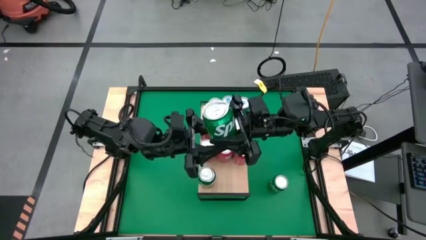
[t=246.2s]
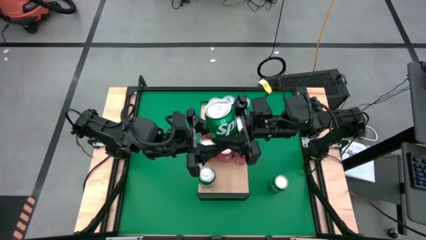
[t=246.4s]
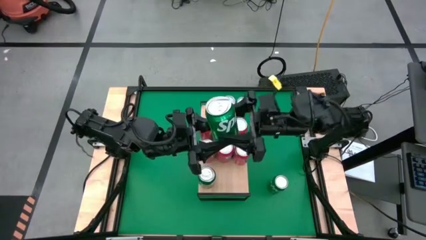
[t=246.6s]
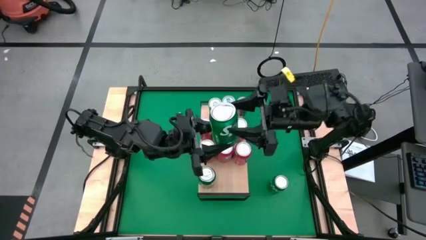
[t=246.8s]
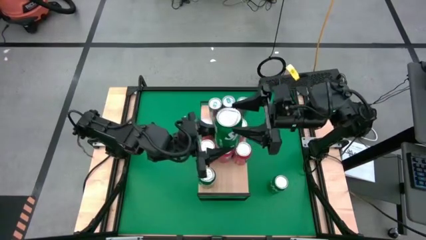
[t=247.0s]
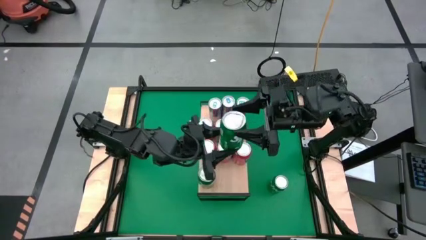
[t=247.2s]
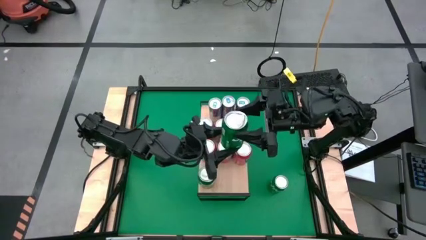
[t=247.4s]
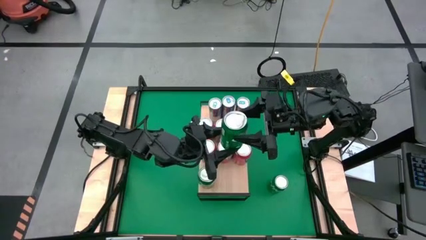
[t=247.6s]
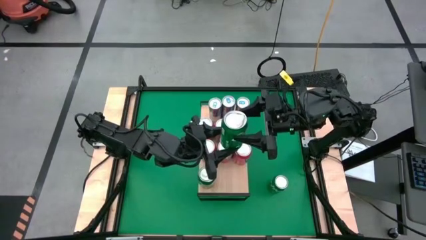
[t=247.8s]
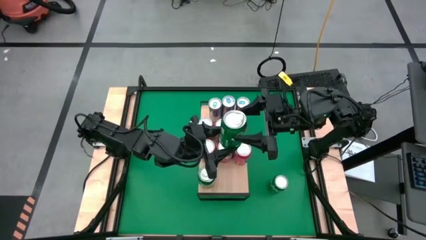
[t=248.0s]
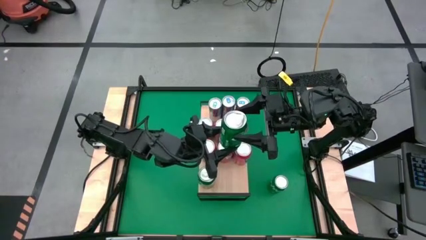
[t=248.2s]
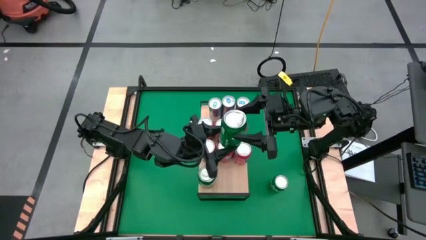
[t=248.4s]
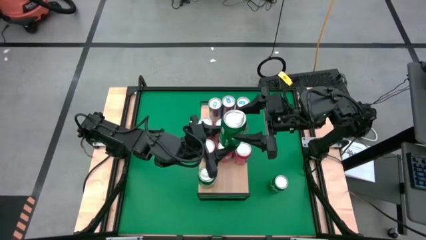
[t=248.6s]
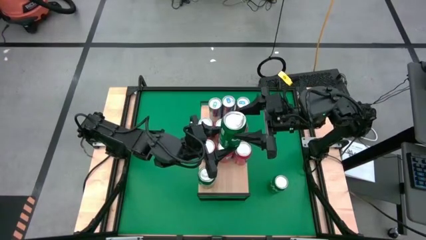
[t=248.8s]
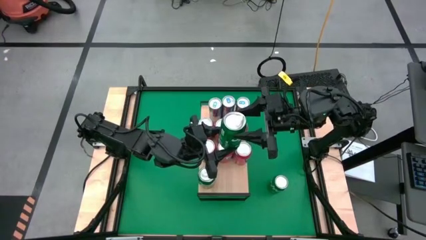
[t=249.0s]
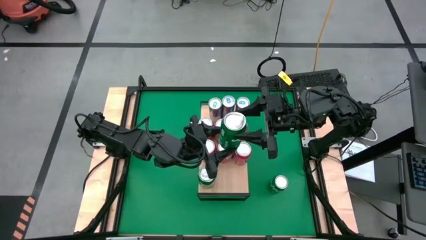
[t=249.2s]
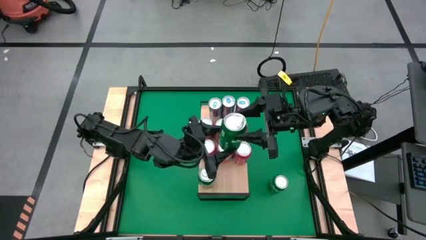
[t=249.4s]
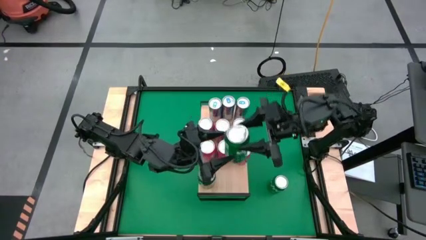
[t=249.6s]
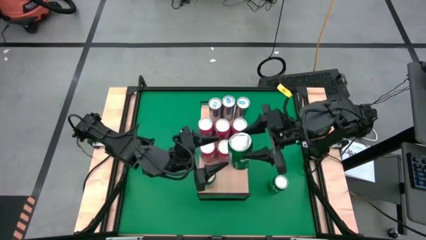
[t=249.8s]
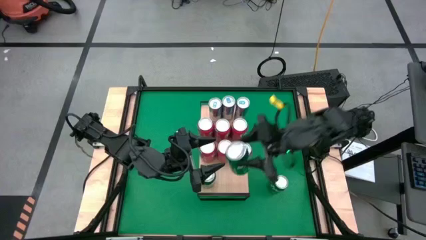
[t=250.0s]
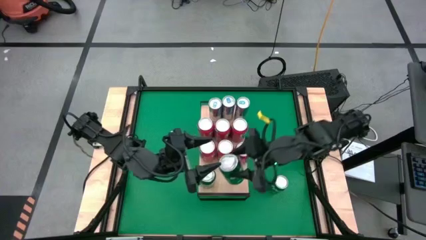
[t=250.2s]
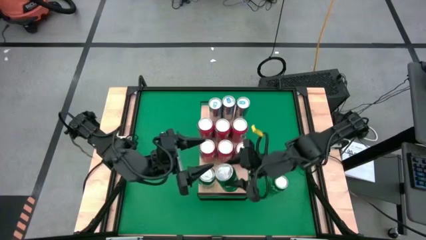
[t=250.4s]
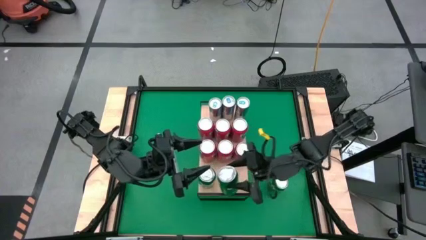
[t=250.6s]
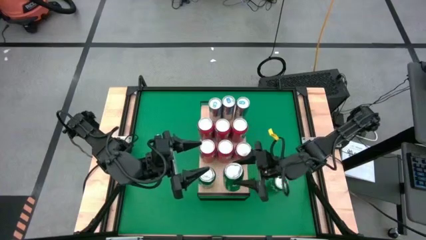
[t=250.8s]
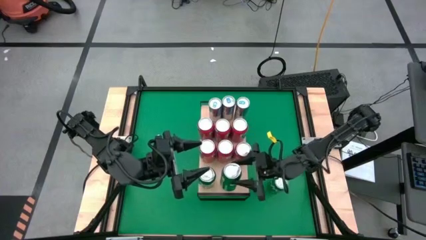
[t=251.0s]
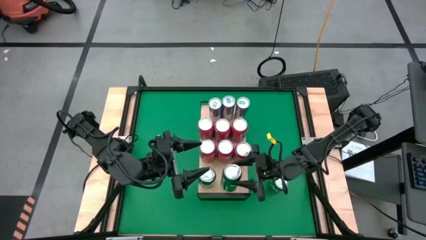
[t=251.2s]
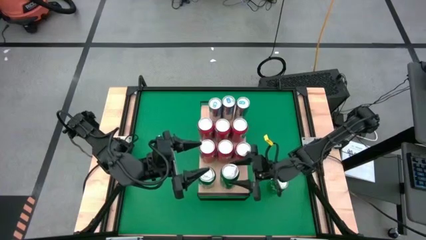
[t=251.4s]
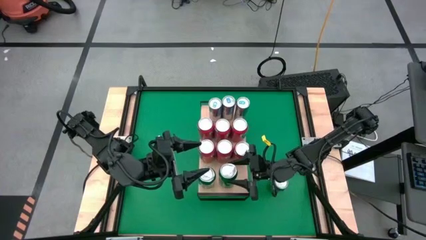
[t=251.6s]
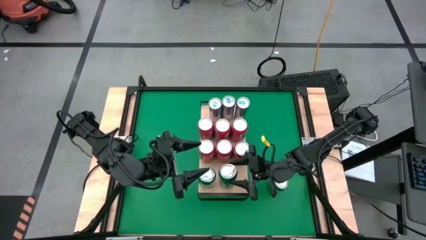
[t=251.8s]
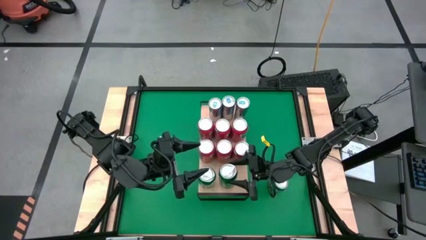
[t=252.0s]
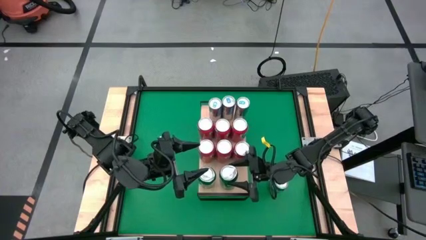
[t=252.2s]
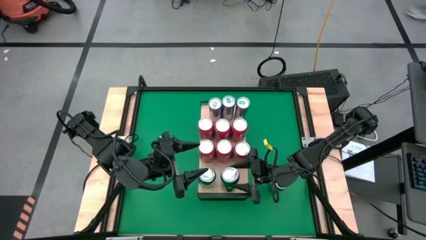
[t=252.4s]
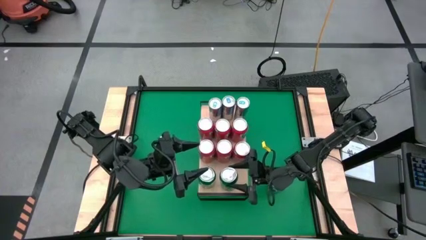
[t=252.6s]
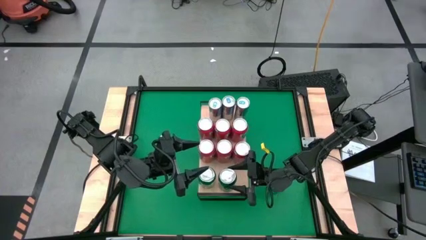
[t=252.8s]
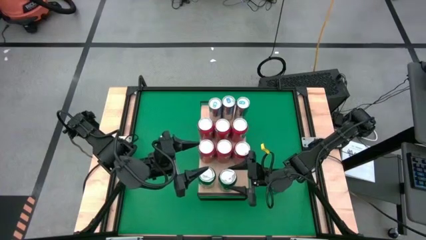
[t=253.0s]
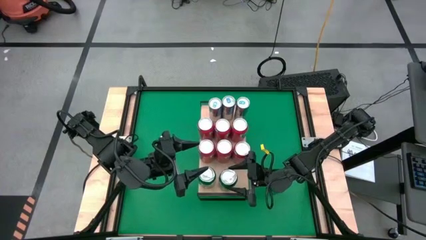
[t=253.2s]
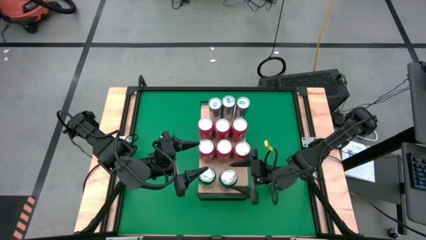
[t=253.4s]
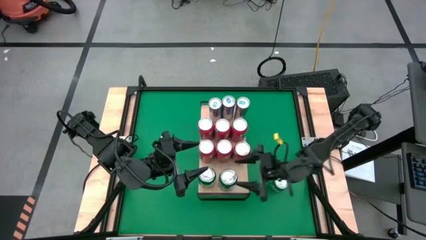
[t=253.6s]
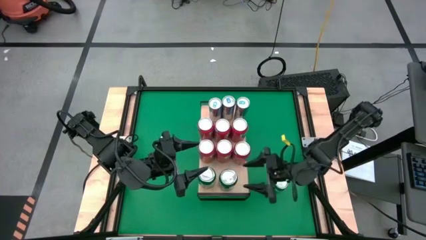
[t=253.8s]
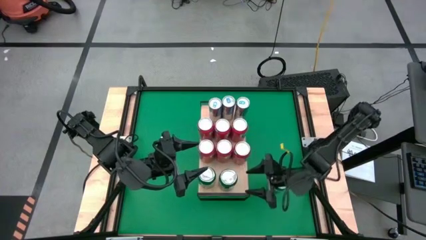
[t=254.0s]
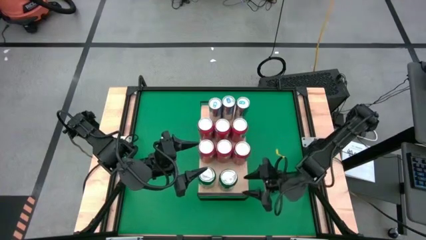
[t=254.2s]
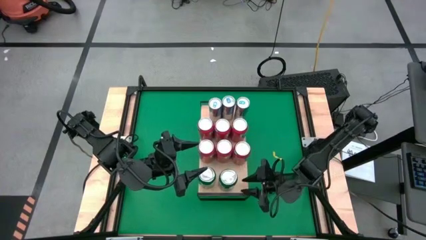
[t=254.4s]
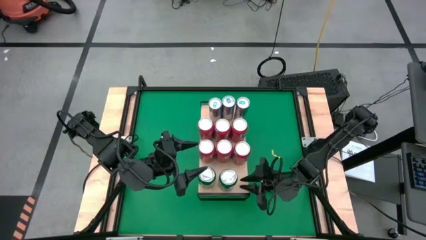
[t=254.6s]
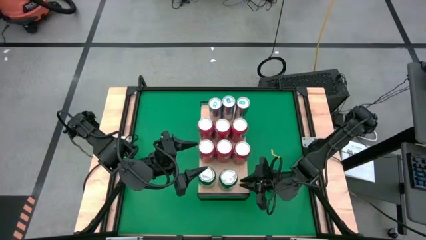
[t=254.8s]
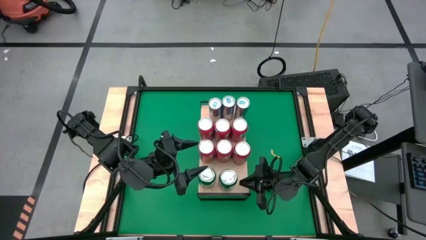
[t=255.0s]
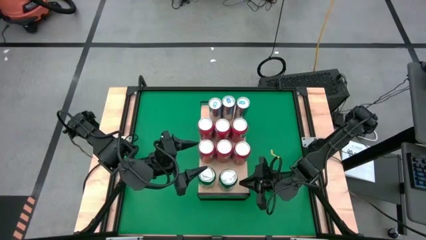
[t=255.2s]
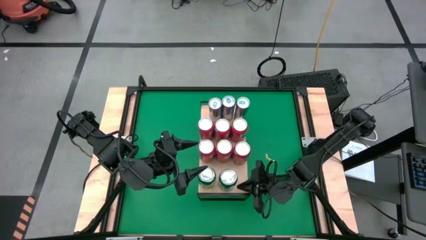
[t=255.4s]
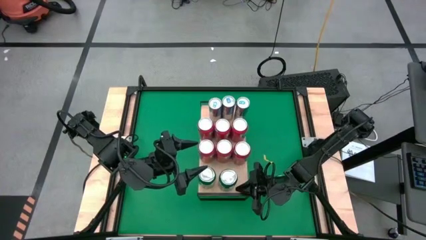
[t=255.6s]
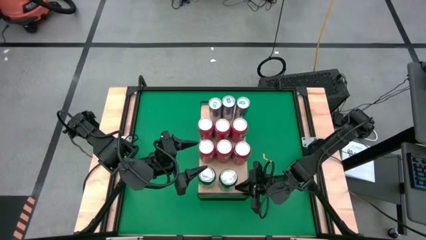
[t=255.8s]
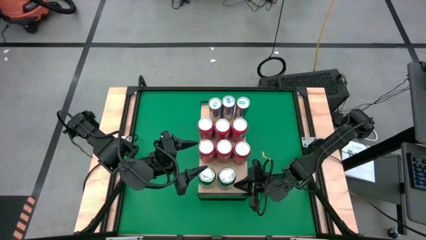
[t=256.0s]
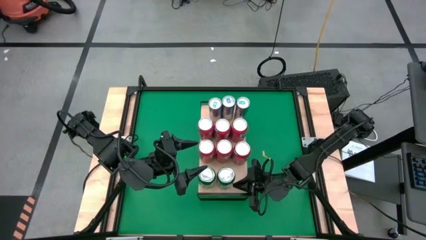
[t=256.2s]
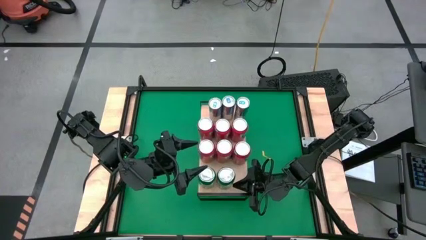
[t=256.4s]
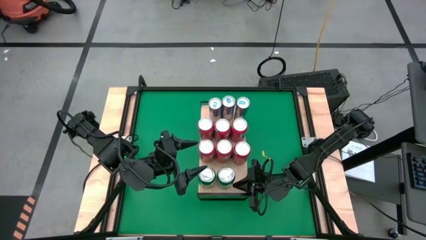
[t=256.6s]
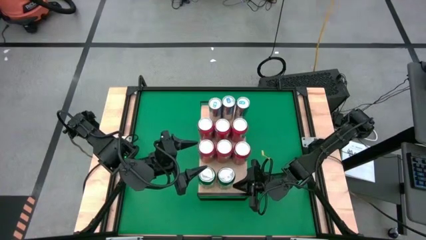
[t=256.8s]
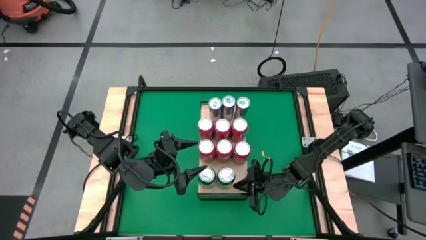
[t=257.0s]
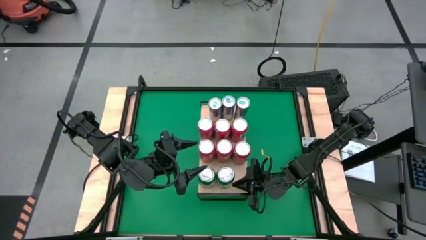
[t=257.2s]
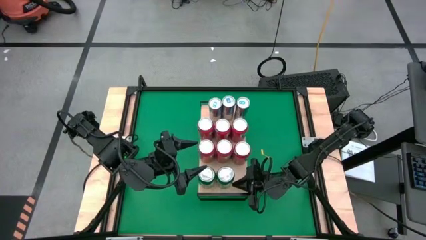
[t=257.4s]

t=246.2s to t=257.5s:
Task: Place canned beverage on shelf
Put the green soda can on the shelf aligned with the other green soda can

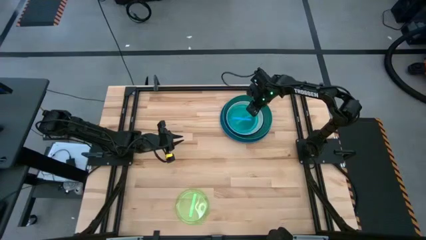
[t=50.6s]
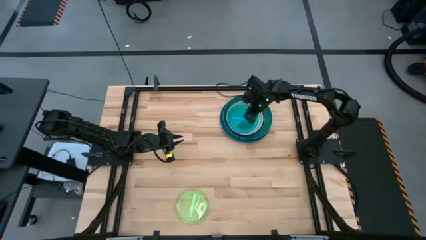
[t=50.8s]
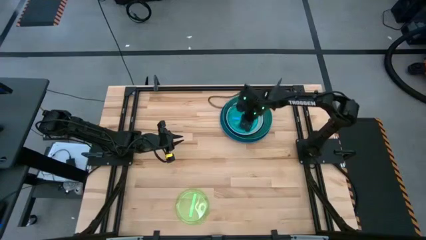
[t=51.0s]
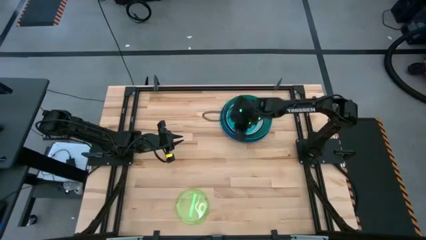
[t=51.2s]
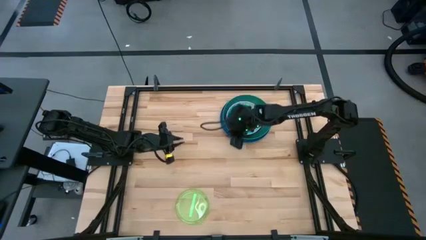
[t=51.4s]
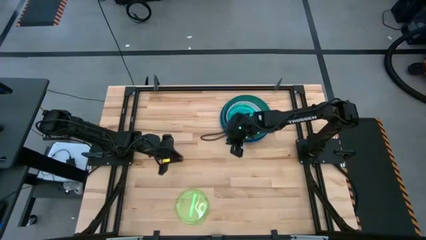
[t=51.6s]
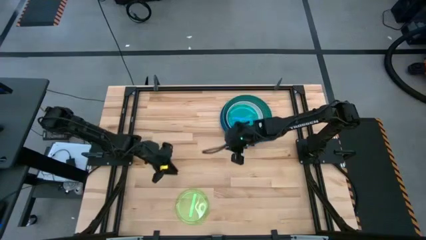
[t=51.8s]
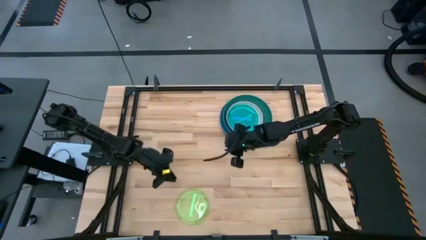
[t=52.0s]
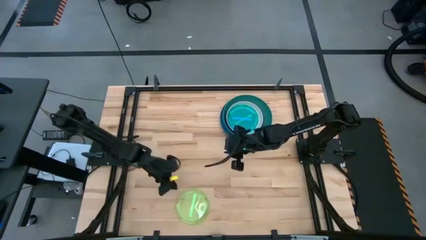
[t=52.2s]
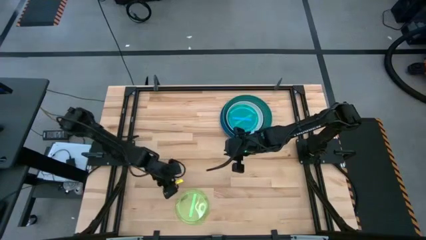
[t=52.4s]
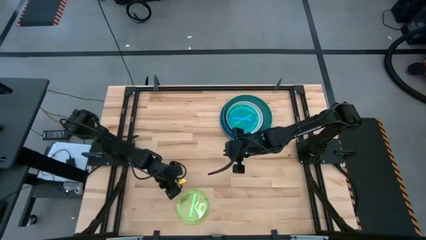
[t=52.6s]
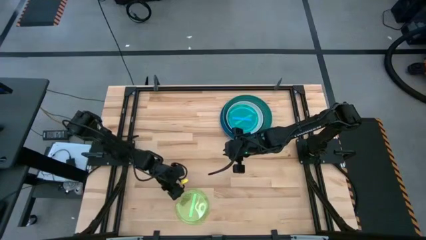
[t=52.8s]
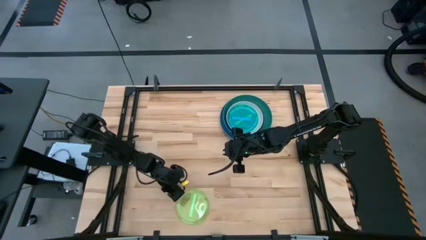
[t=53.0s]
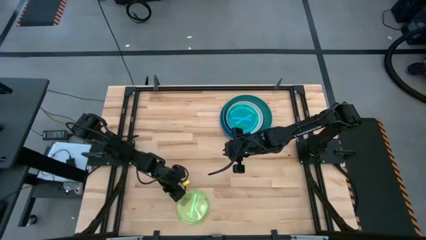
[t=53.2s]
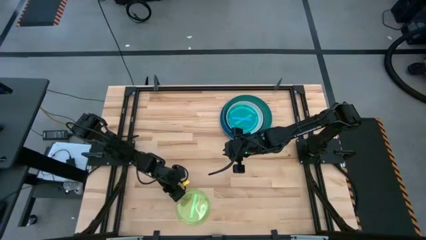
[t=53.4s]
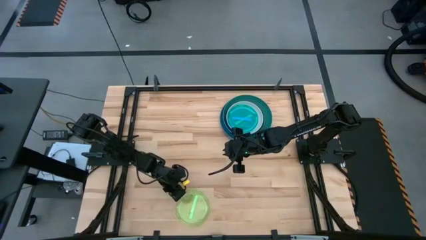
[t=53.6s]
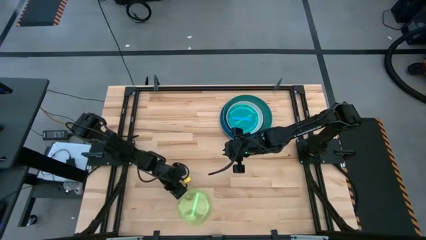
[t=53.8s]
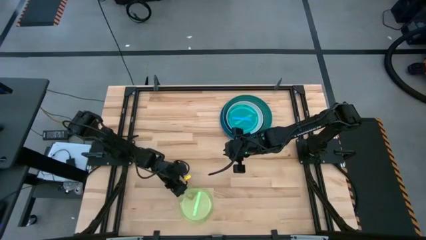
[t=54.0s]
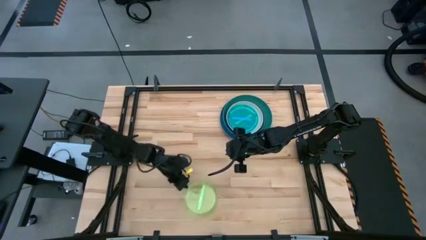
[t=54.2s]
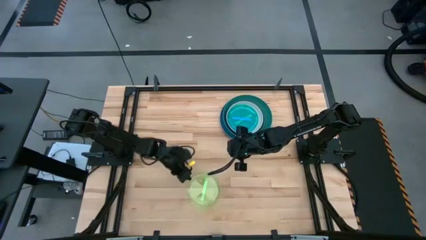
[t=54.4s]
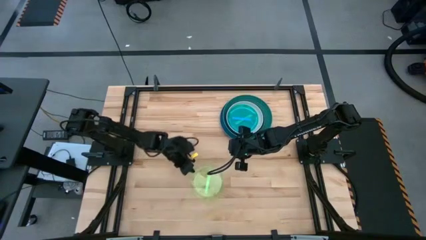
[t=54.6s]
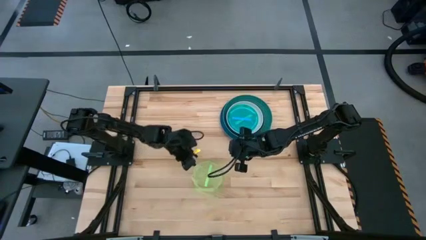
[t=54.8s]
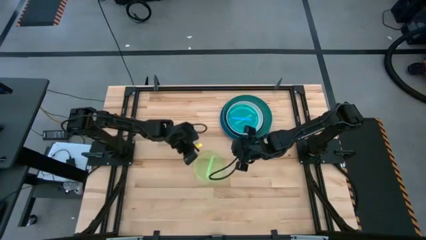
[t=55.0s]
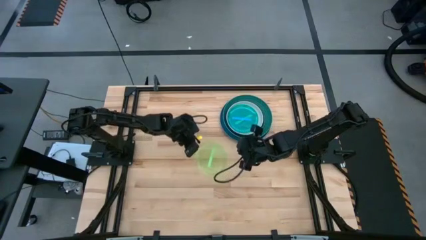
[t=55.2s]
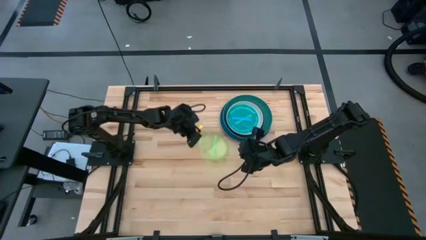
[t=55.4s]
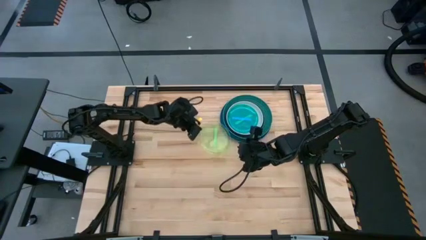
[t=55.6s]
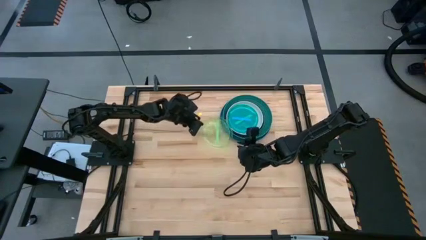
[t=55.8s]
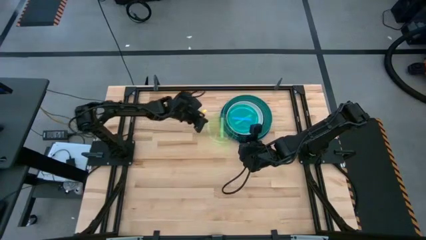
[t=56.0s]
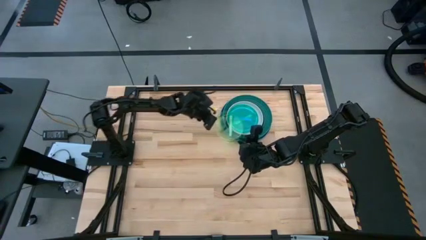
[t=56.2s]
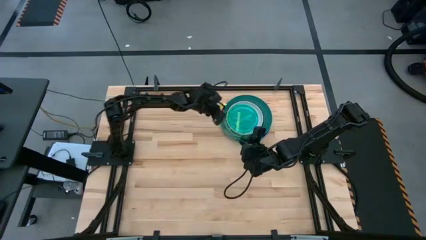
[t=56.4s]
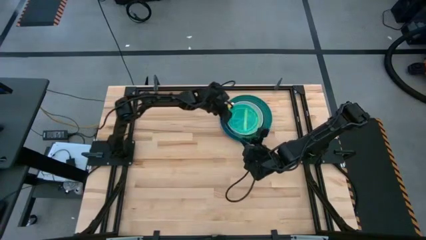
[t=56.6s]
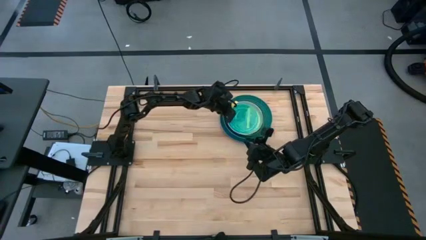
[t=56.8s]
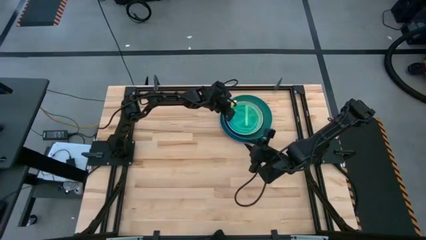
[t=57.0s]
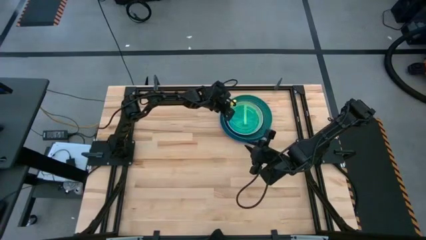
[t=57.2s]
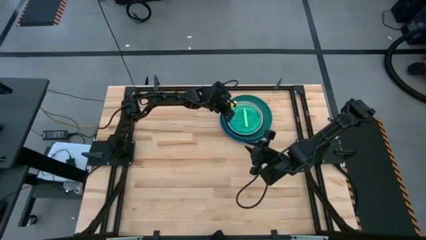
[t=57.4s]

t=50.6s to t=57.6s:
Task: Stack plastic plates
Stack the light green plate on top of the light blue plate
